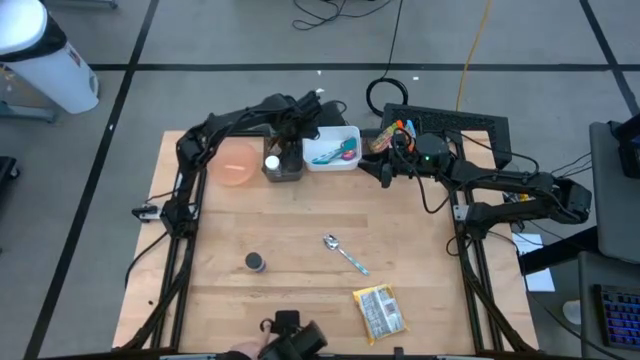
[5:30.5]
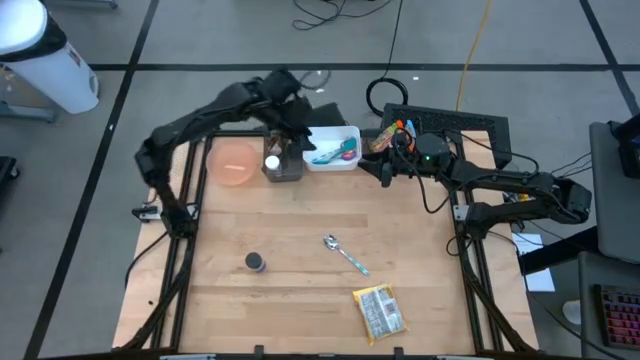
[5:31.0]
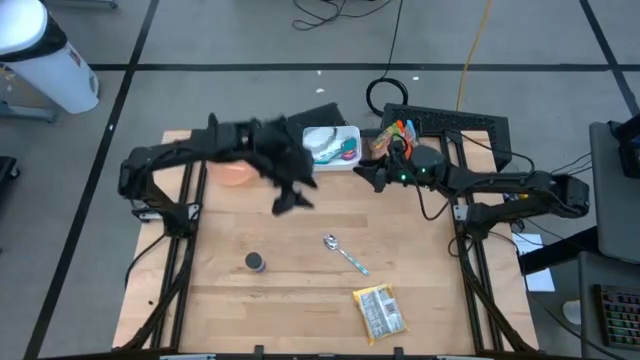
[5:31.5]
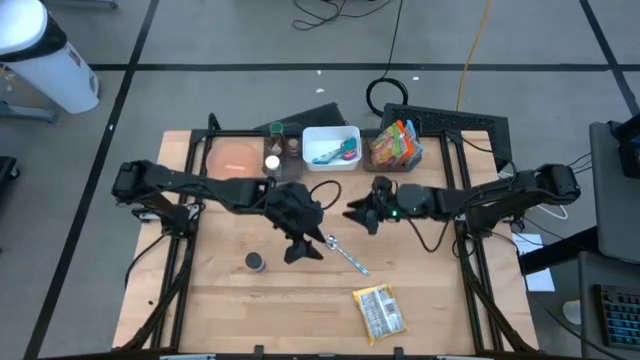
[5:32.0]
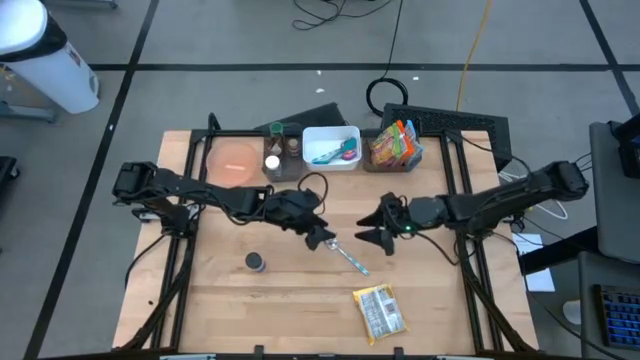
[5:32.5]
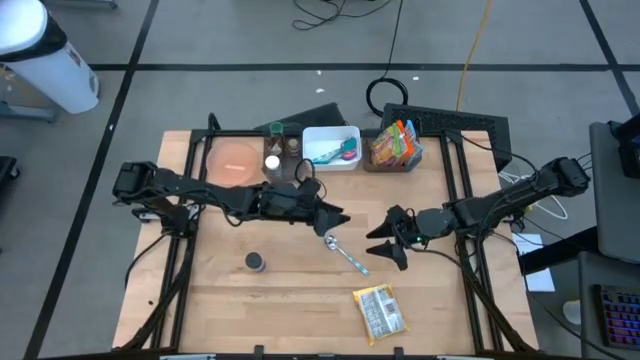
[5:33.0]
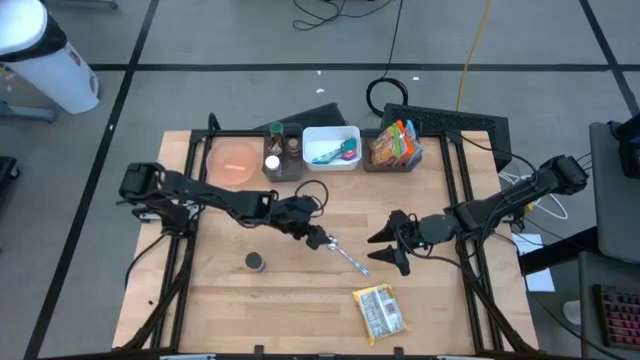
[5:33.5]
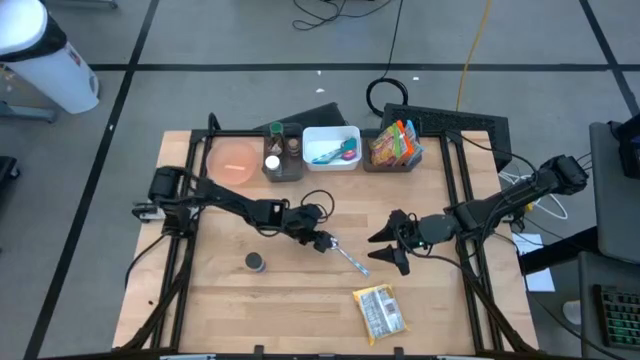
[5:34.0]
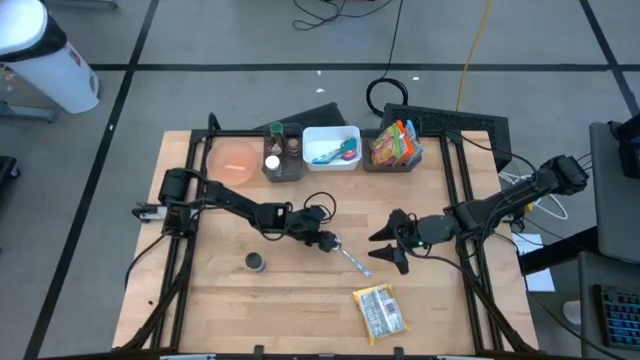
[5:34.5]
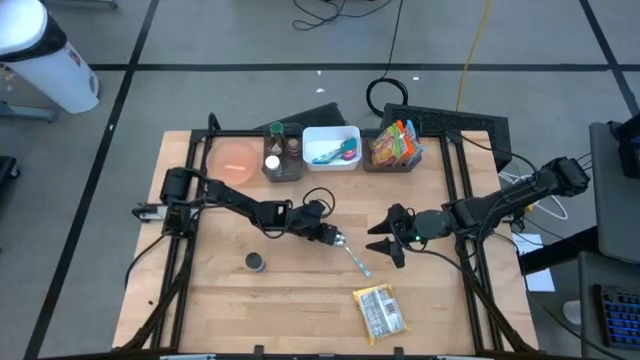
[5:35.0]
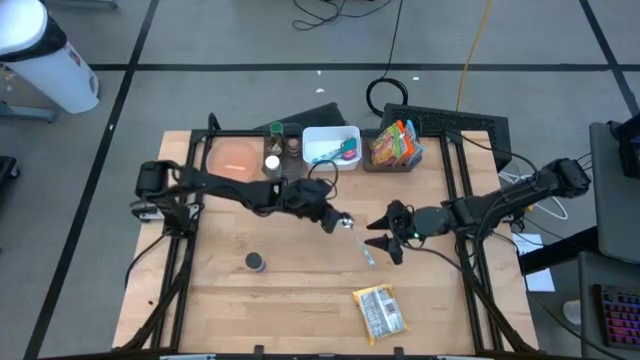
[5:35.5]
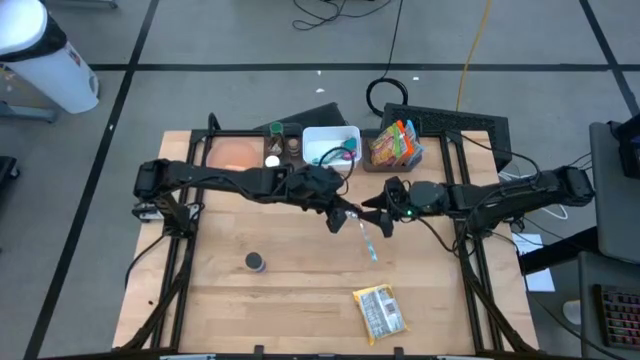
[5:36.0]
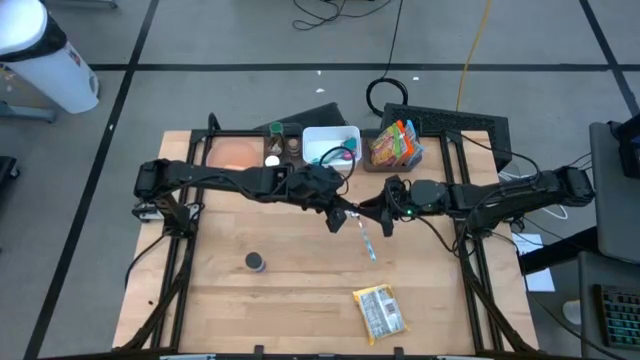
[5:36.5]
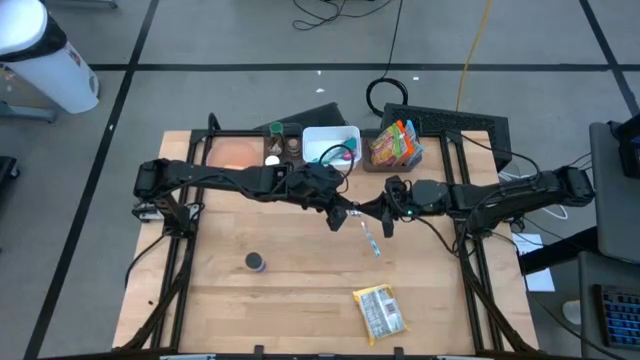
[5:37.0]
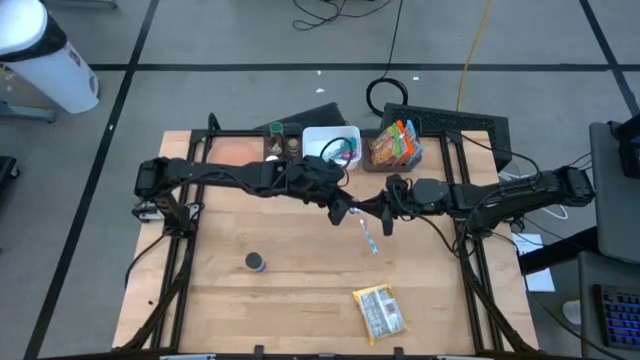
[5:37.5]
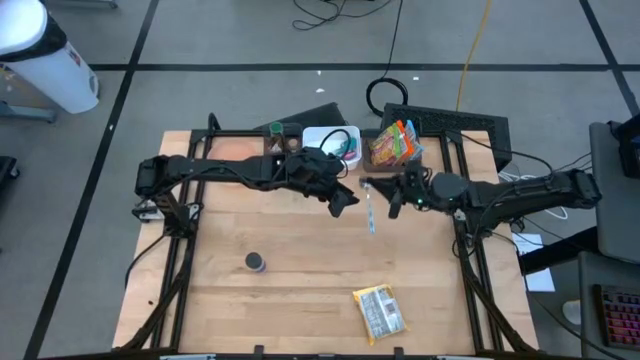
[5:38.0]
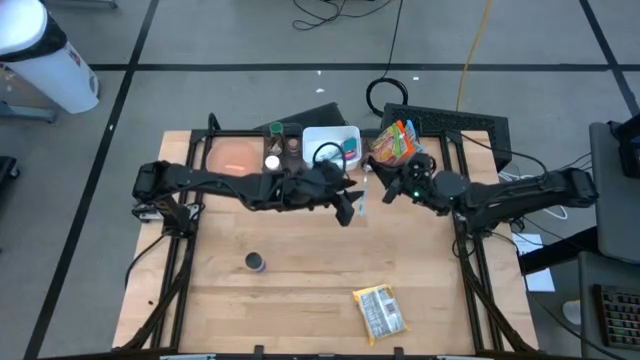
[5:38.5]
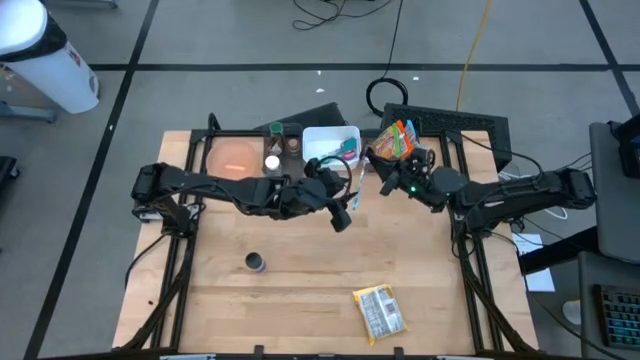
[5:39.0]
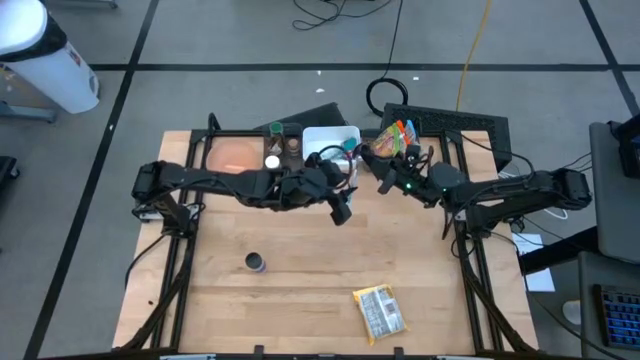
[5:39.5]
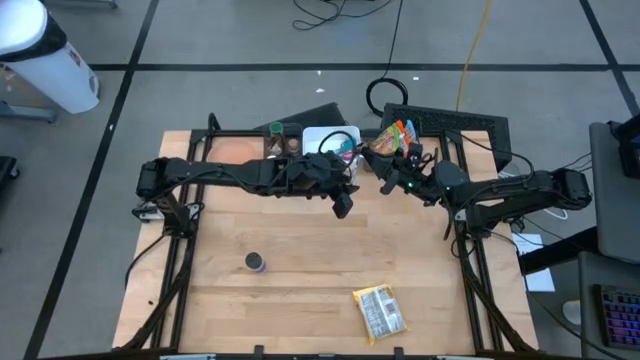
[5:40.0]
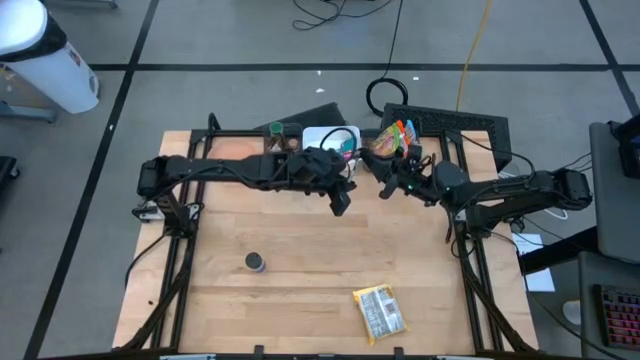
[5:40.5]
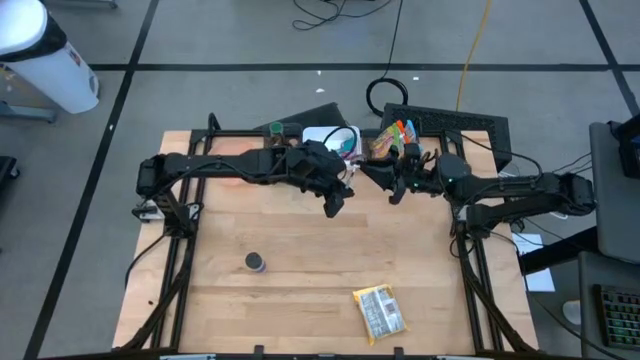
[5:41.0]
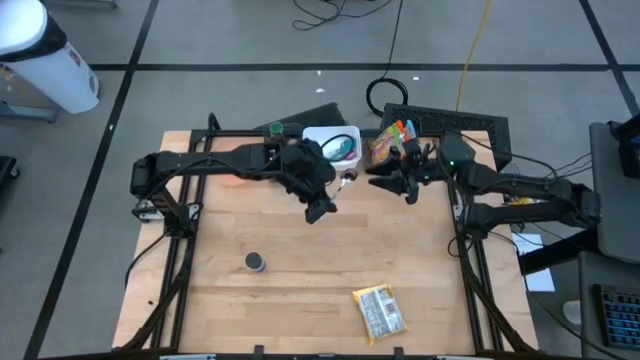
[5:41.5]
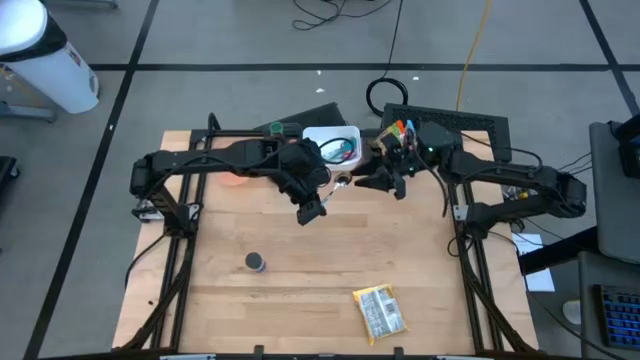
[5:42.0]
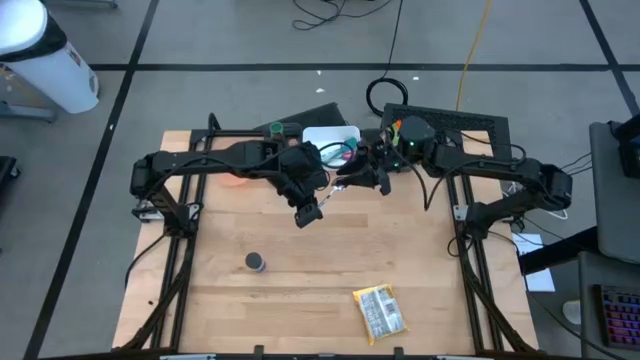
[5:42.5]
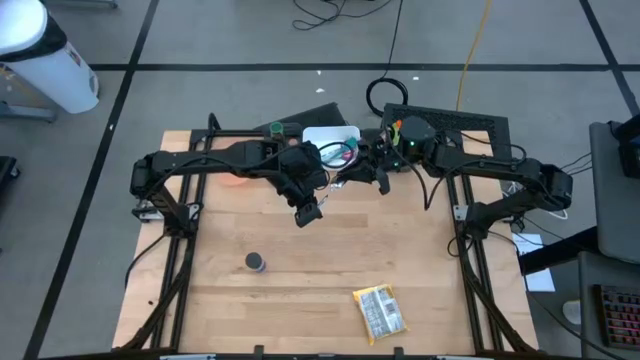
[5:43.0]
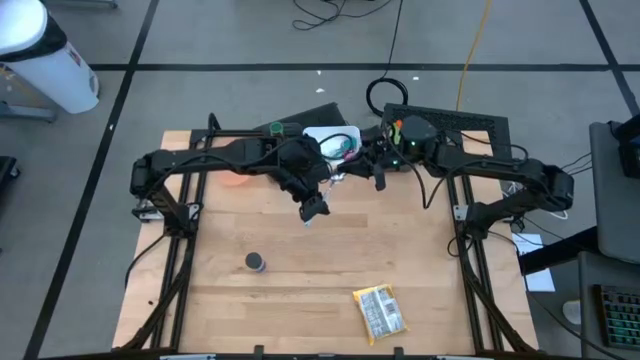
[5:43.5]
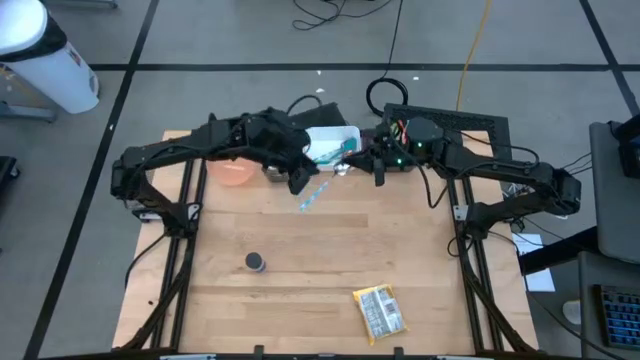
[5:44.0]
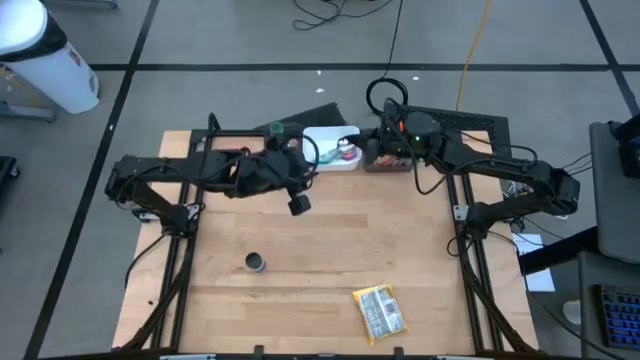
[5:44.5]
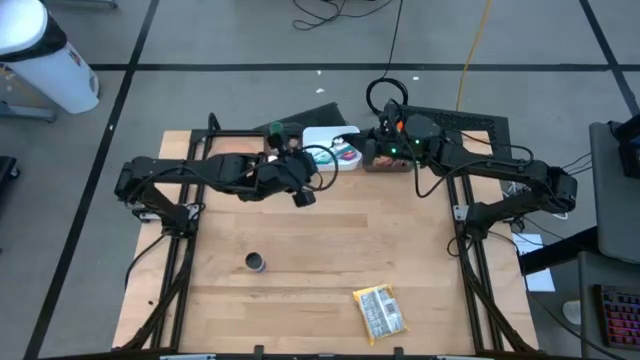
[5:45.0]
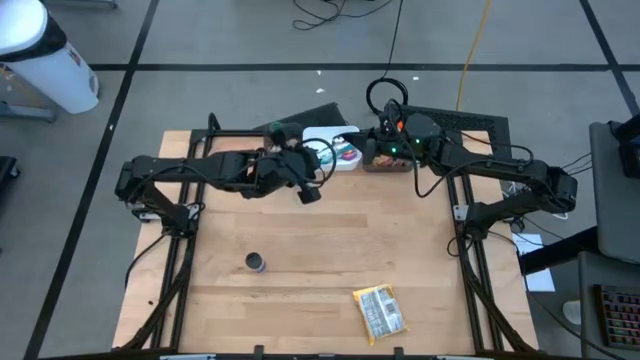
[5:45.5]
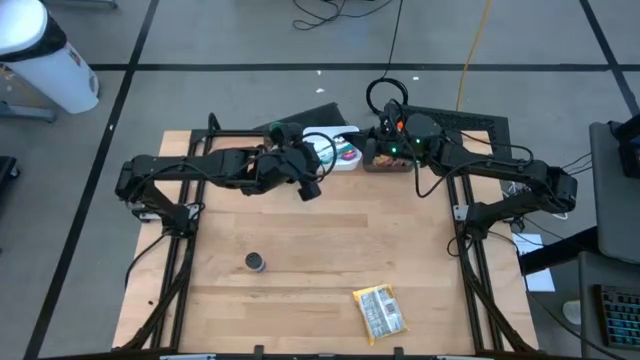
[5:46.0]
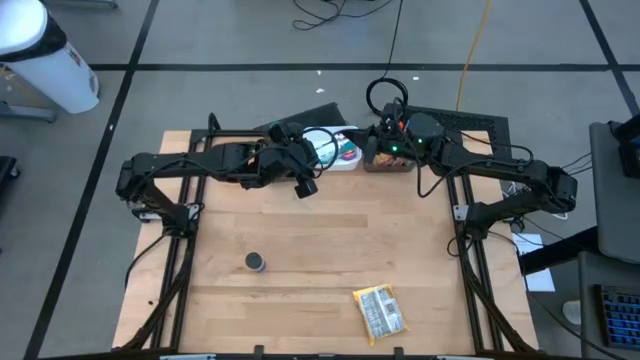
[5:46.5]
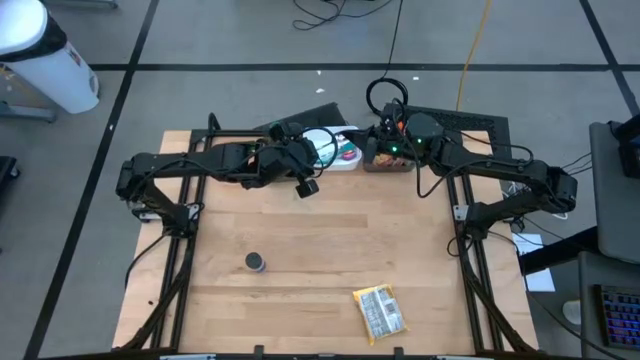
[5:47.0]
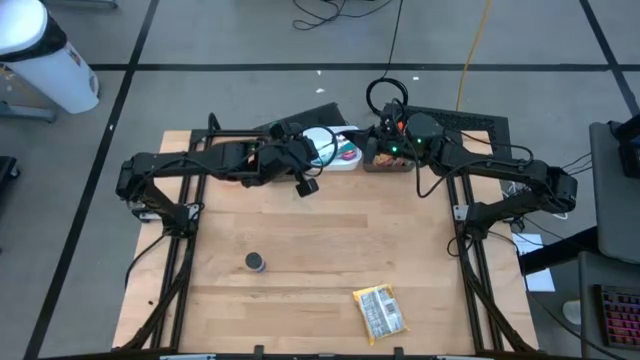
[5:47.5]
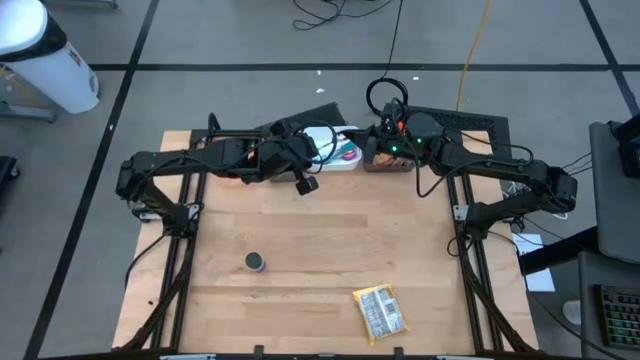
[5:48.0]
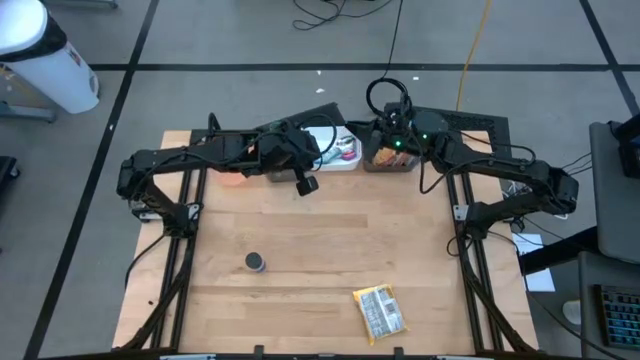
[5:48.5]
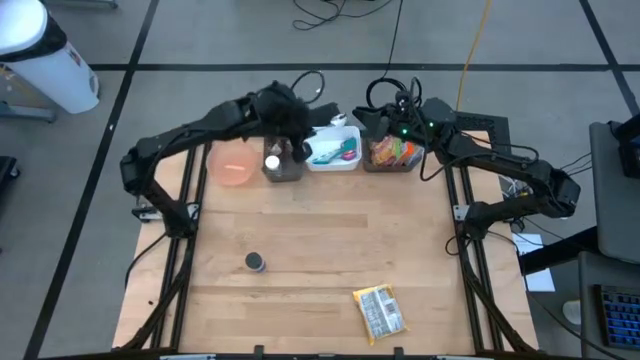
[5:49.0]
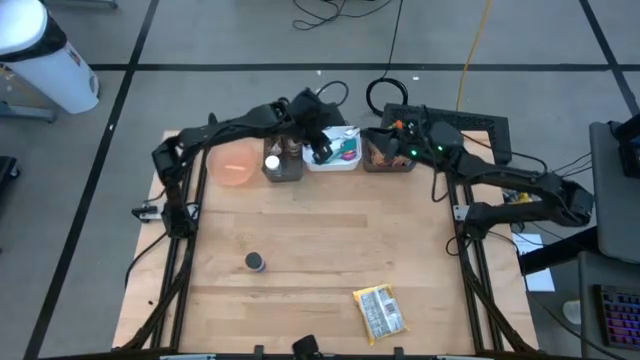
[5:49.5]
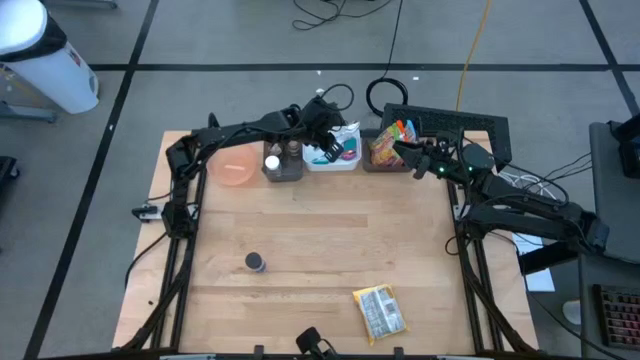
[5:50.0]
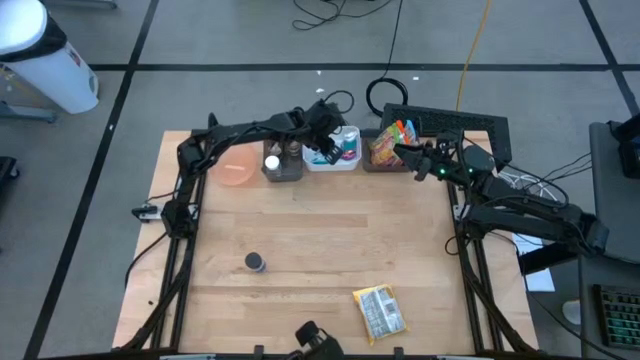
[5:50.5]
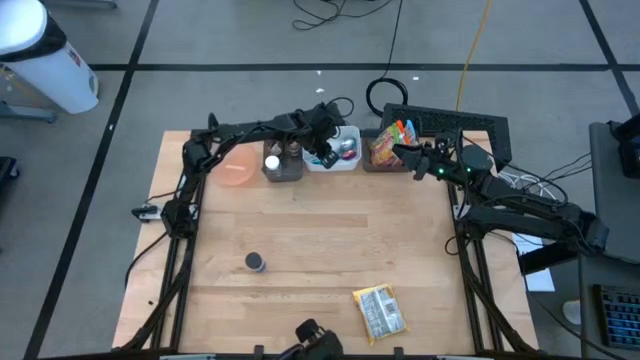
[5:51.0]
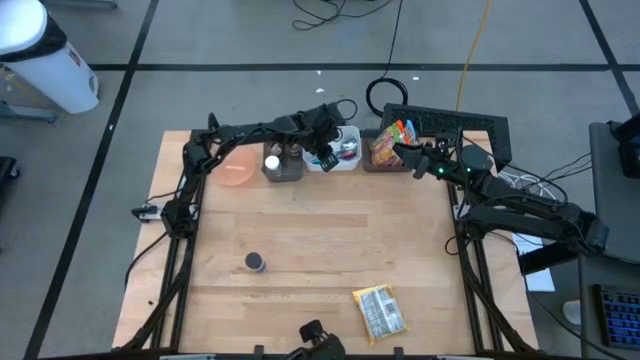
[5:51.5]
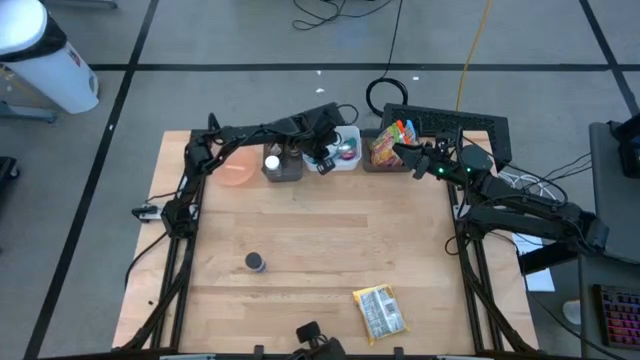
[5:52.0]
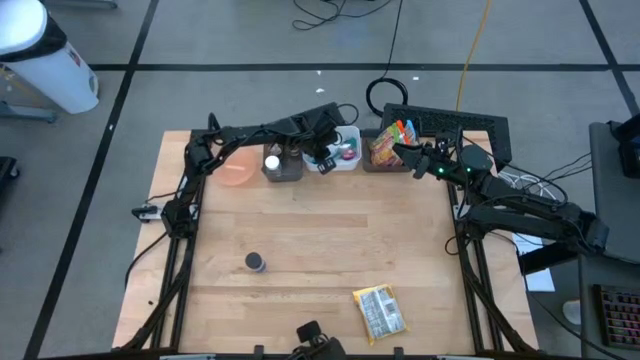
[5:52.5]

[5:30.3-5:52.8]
Task: Pick & Place Food Item
Put the blue spoon into the white bin
